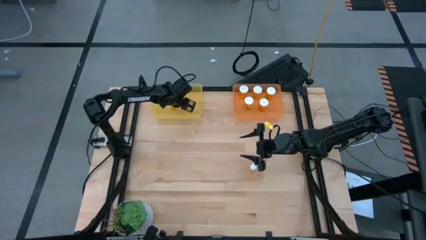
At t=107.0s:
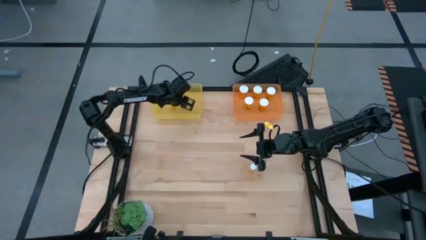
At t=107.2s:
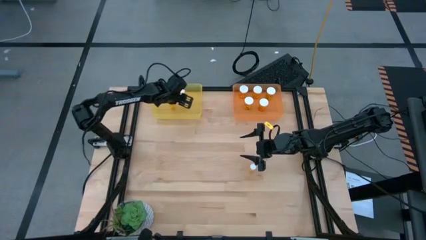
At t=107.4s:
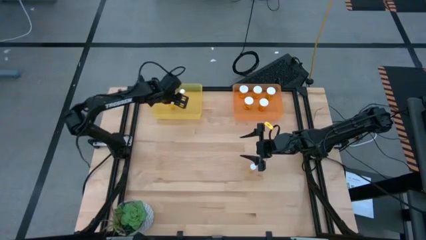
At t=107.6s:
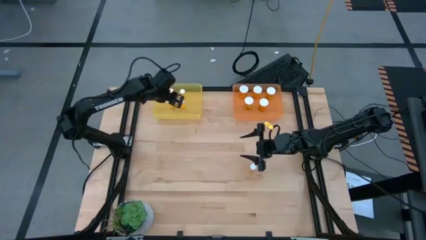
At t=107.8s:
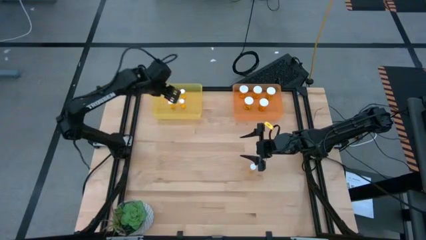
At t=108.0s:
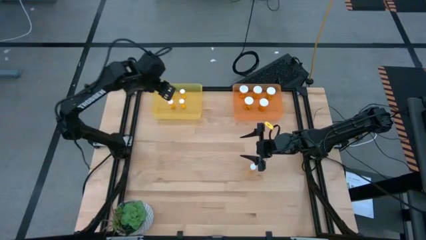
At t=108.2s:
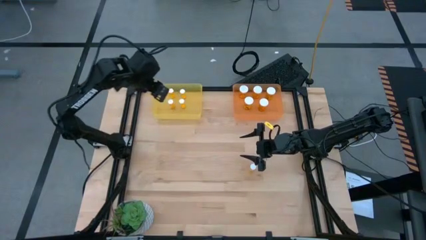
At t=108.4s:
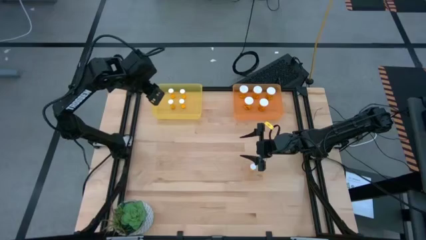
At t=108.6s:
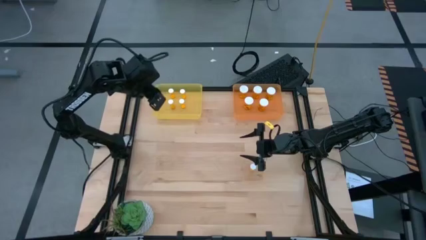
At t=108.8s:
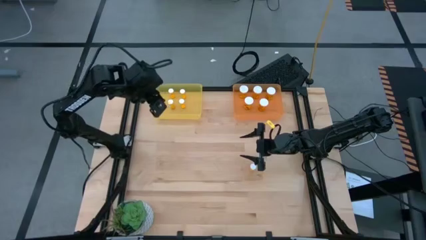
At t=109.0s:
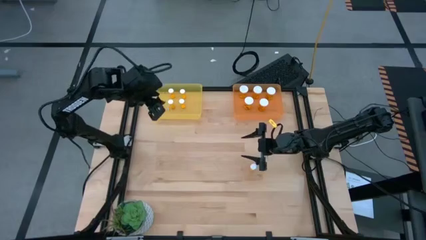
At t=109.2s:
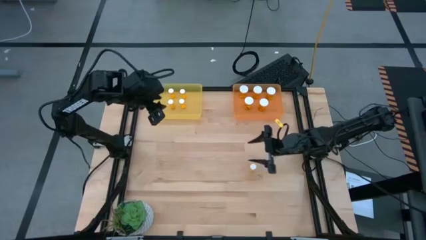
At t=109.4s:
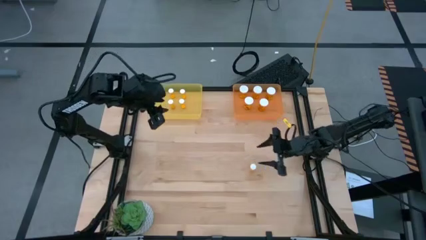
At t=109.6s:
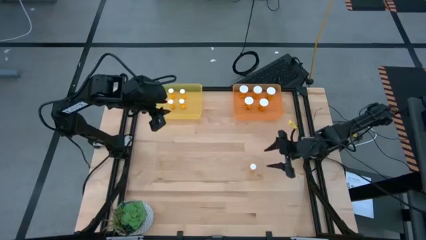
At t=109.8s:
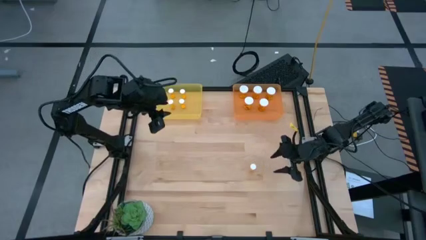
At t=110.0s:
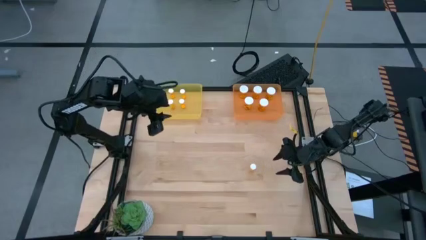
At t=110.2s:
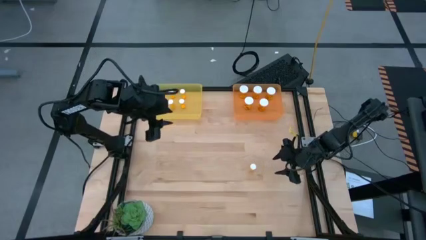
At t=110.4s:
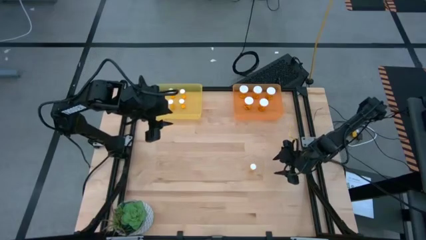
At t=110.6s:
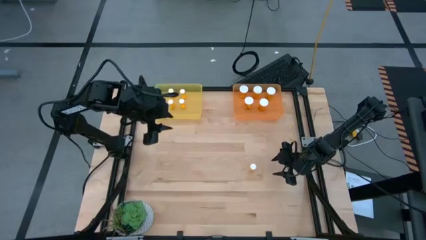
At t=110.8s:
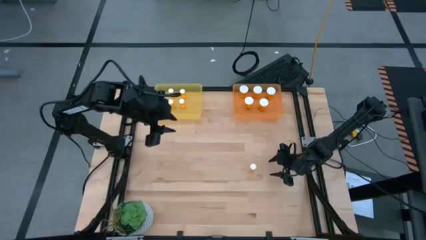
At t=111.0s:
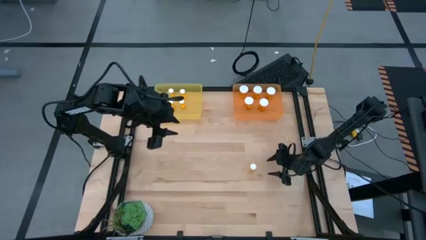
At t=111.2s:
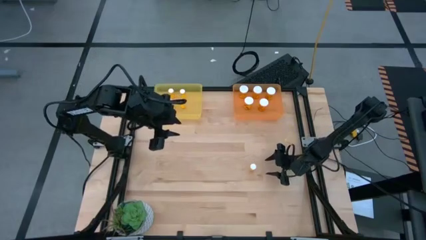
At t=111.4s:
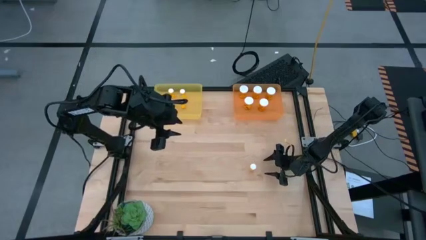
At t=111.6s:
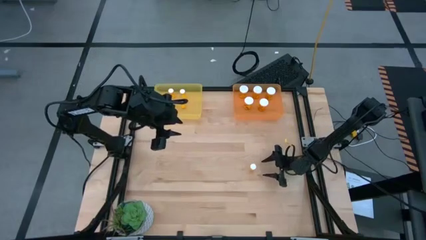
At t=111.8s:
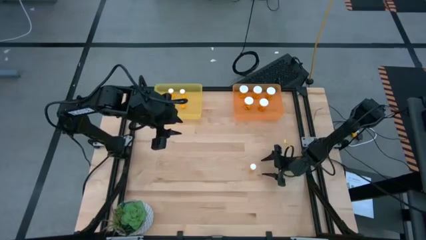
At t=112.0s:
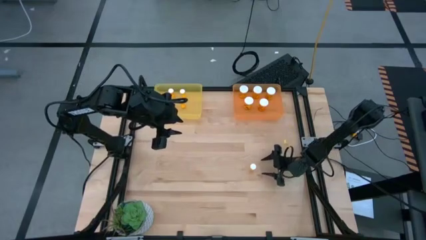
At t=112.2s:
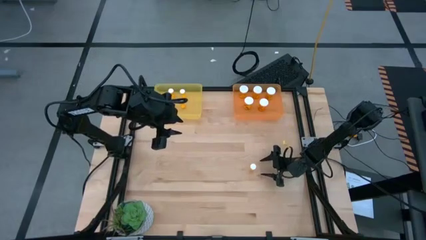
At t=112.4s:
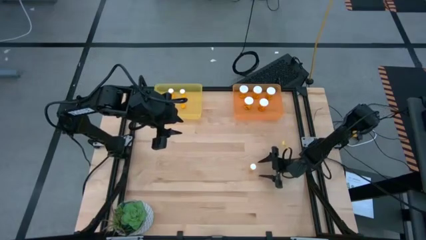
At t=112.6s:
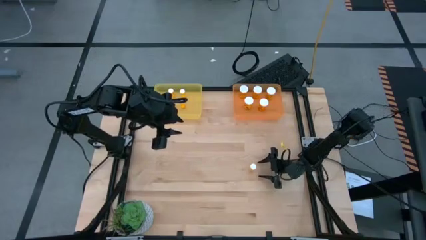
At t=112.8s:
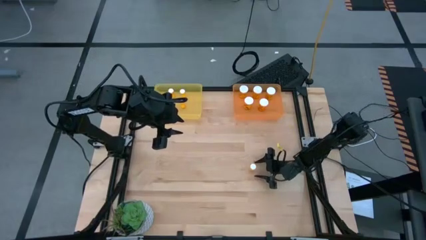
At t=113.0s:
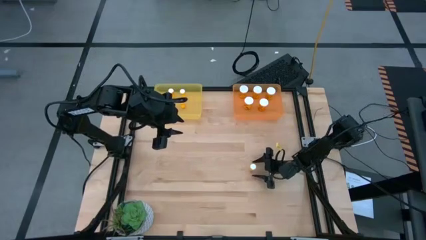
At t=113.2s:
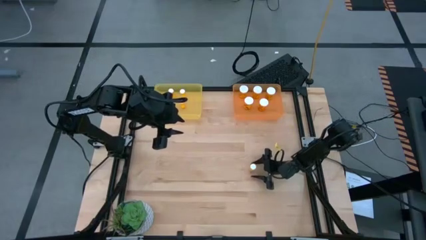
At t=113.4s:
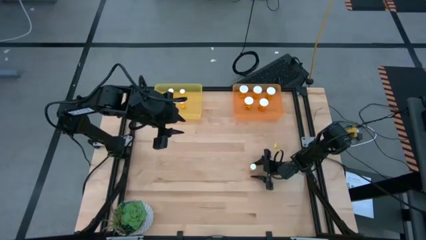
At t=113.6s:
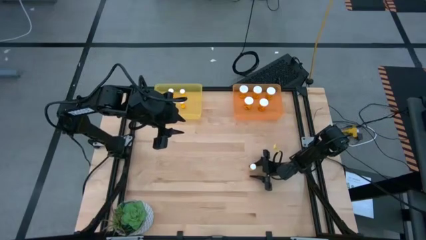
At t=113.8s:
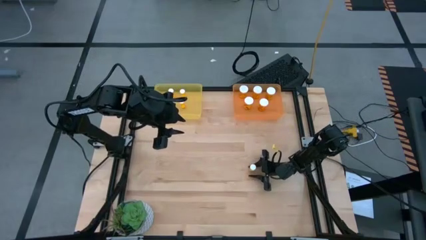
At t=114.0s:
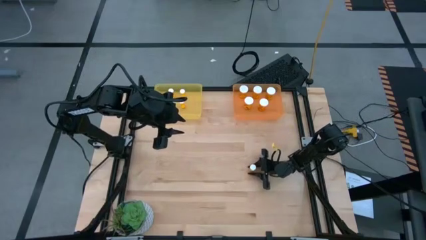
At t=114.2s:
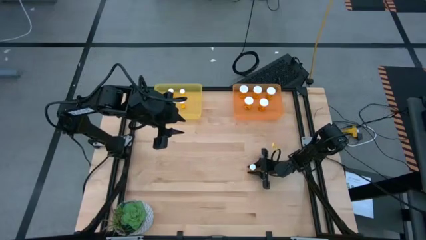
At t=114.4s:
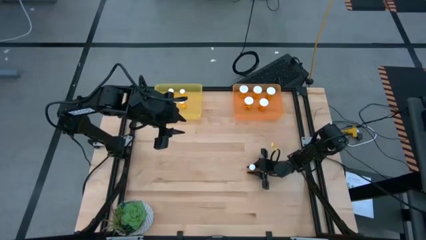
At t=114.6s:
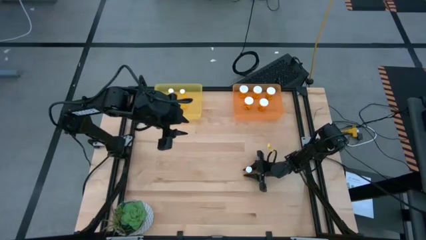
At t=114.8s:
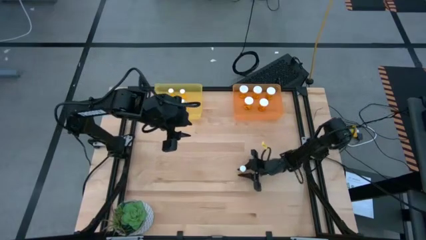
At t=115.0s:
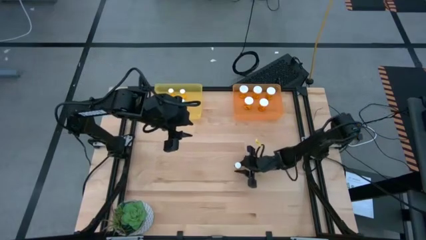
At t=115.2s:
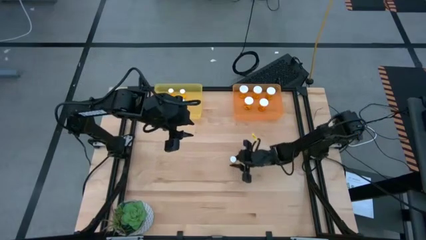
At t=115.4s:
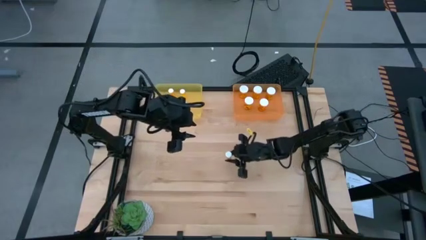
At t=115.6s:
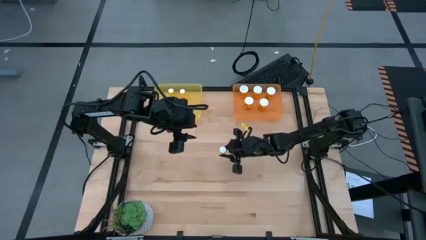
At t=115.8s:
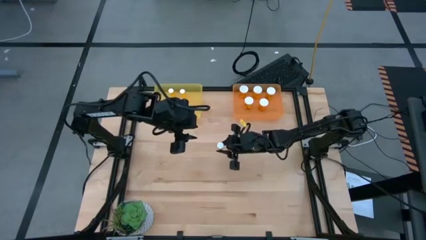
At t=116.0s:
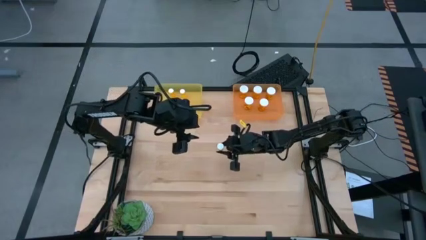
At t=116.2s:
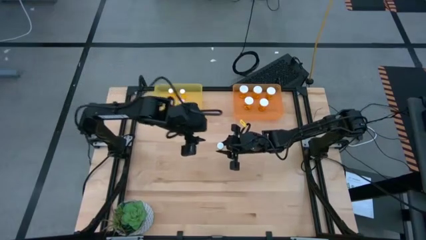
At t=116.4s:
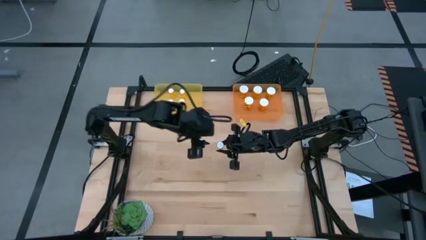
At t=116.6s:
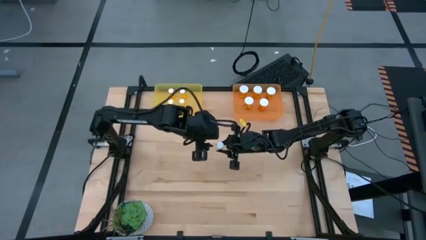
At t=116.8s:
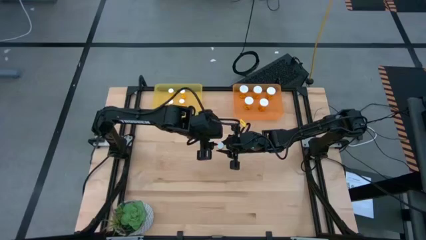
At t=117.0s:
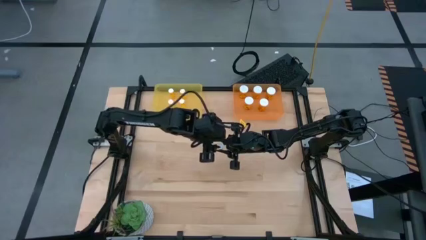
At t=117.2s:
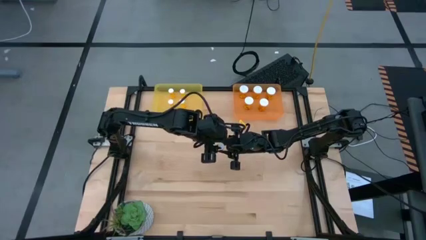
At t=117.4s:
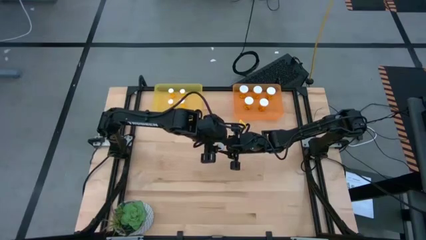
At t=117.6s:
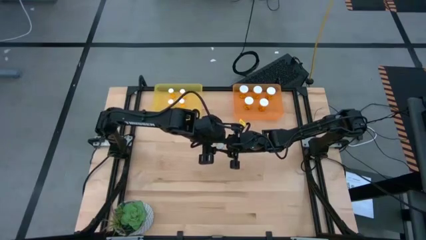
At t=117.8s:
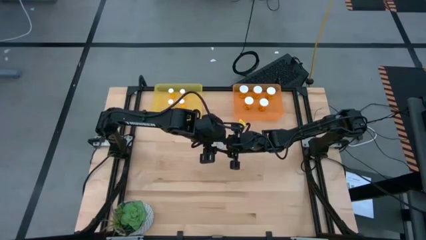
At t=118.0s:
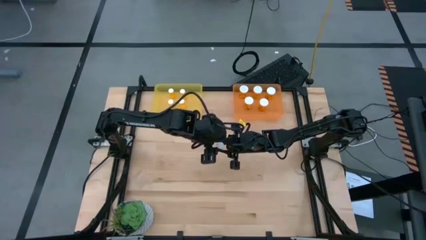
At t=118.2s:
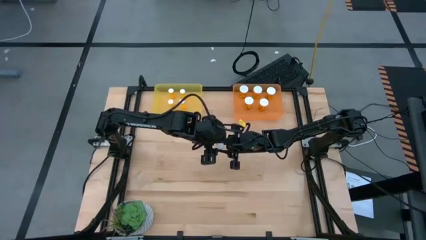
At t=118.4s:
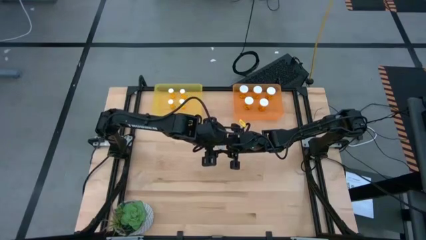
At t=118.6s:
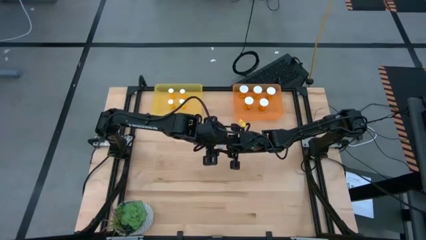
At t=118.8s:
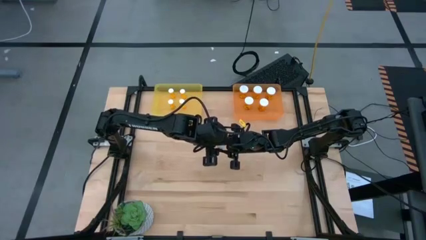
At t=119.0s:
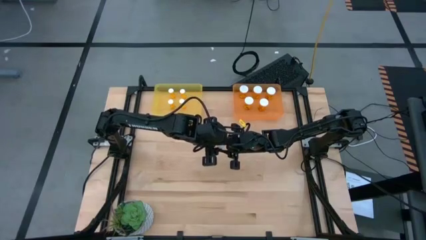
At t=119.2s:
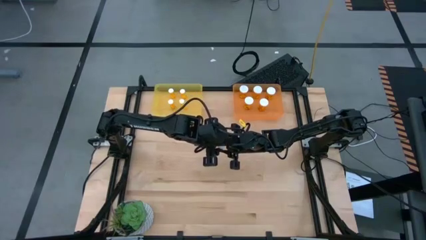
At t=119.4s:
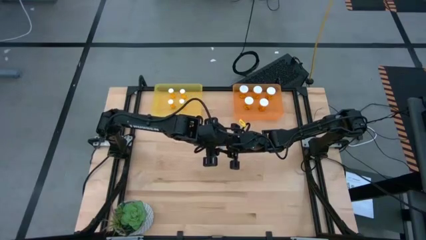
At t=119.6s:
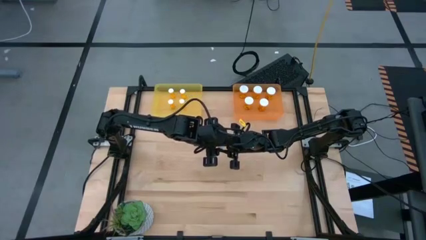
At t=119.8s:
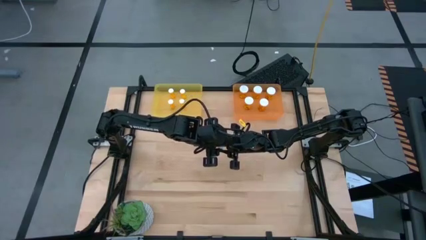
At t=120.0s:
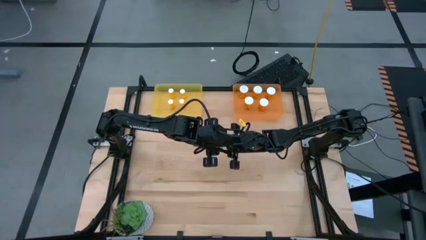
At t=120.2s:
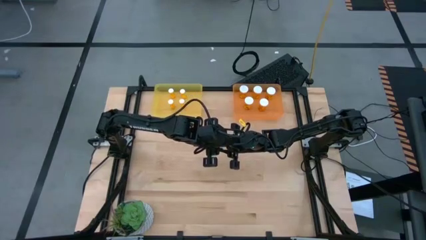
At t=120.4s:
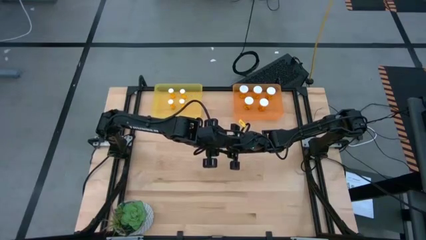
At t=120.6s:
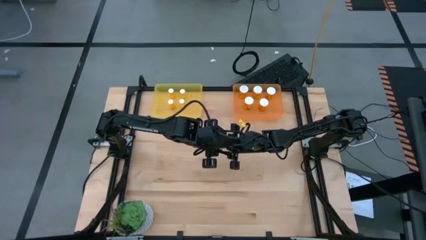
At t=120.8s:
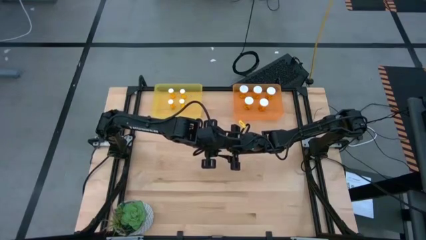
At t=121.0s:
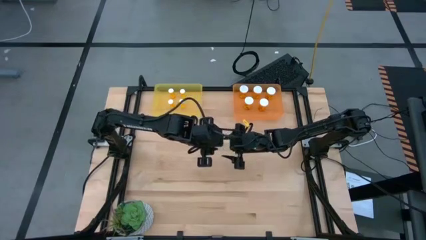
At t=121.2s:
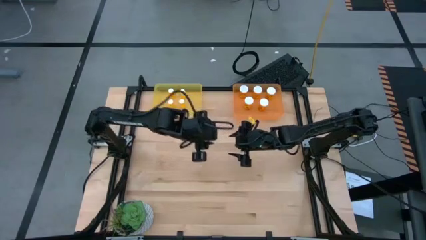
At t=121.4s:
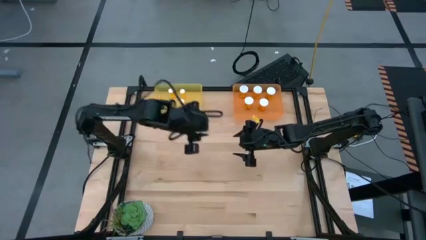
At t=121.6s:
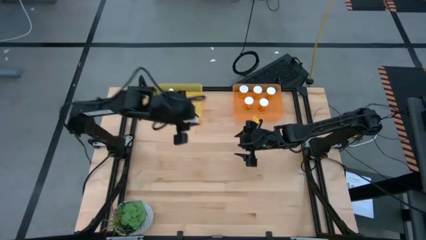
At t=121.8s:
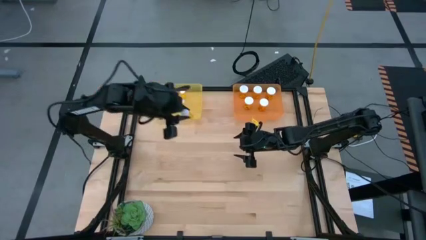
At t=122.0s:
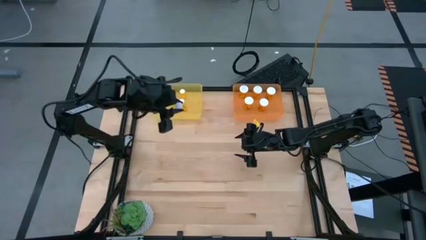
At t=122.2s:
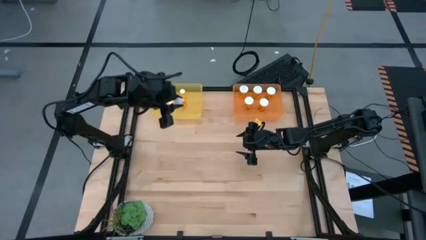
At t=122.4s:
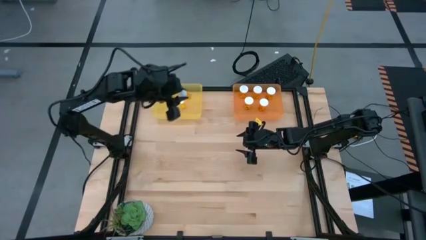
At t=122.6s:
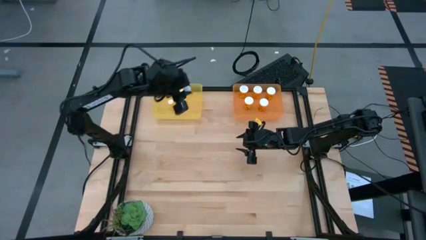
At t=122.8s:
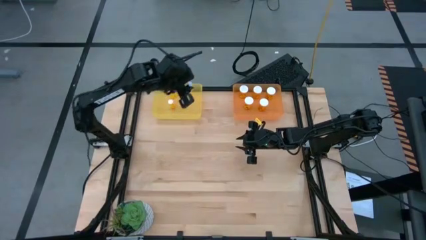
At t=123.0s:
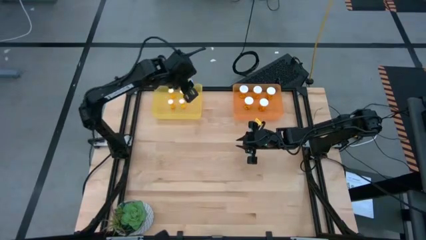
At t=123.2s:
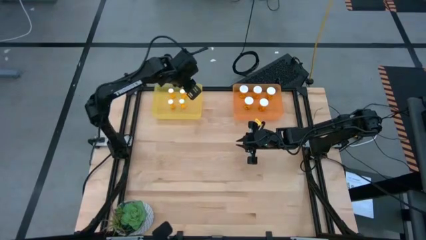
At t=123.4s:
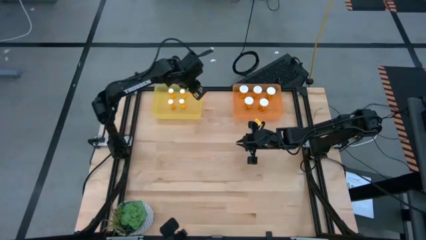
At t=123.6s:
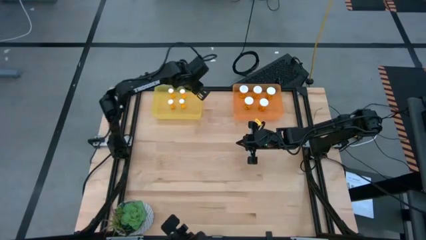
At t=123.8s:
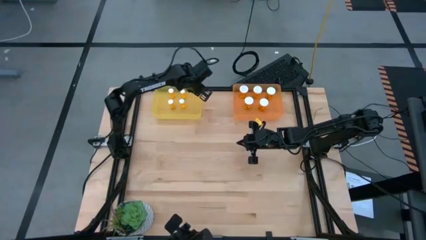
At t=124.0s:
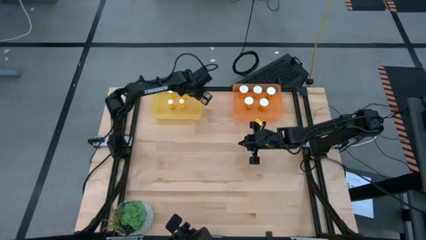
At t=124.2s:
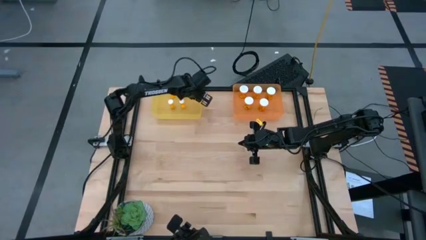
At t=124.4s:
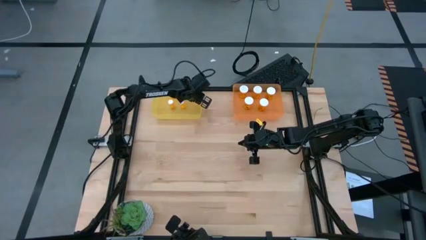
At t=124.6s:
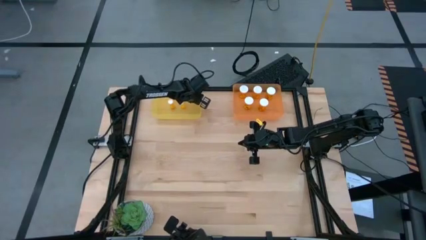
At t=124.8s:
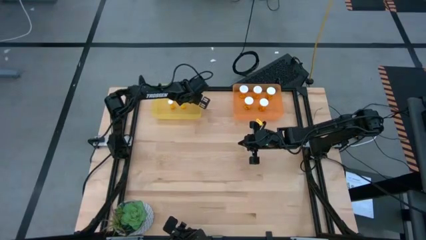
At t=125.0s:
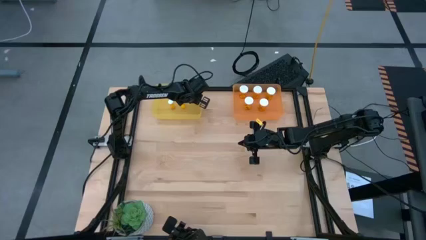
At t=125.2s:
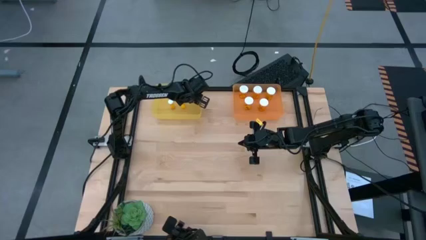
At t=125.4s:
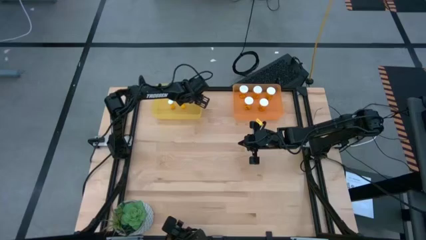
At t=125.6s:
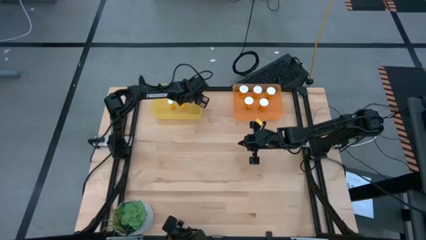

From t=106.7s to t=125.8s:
Task: Pick and place medicine bottles into bin by pill shape (circle, oval)
Put the small yellow pill bottle into the transparent yellow bin
